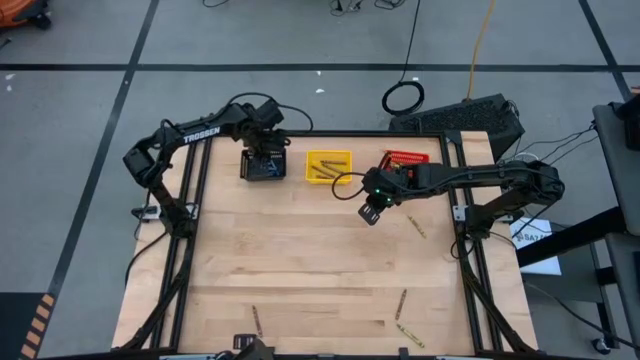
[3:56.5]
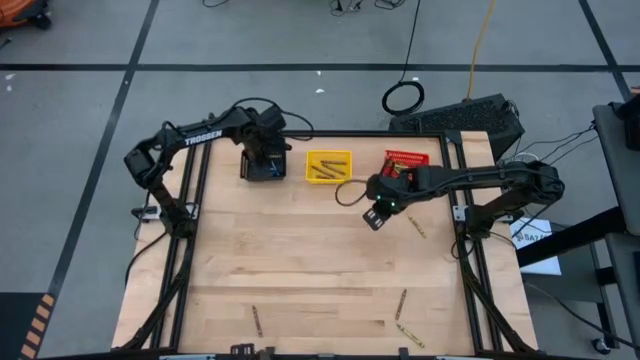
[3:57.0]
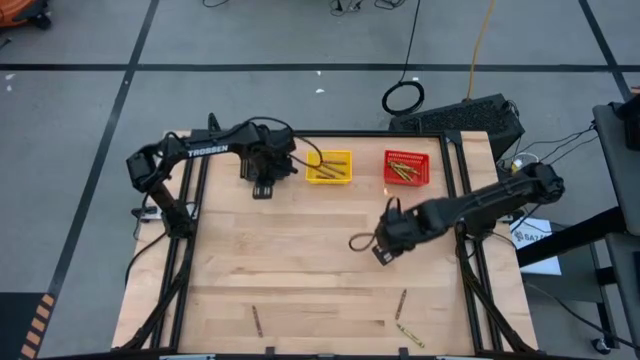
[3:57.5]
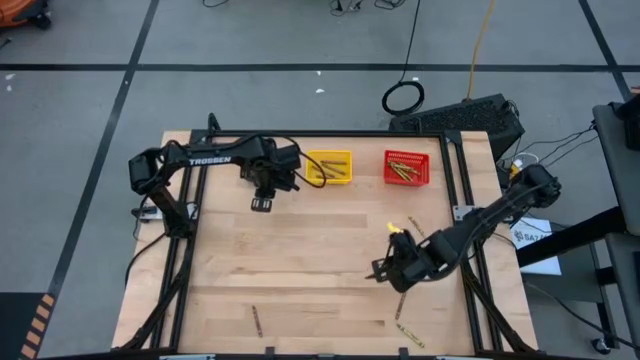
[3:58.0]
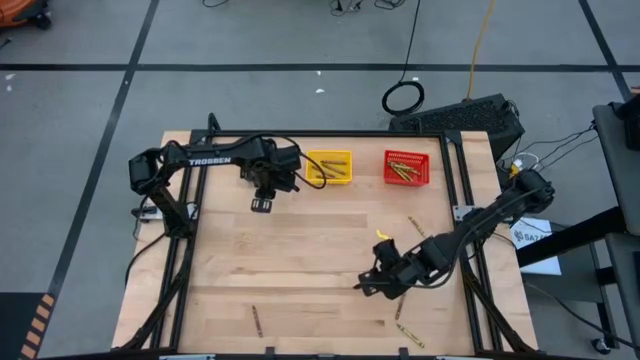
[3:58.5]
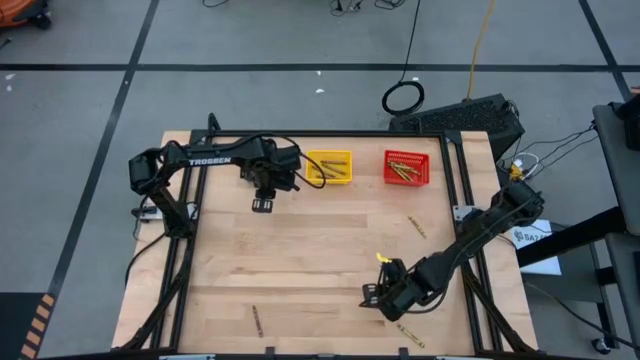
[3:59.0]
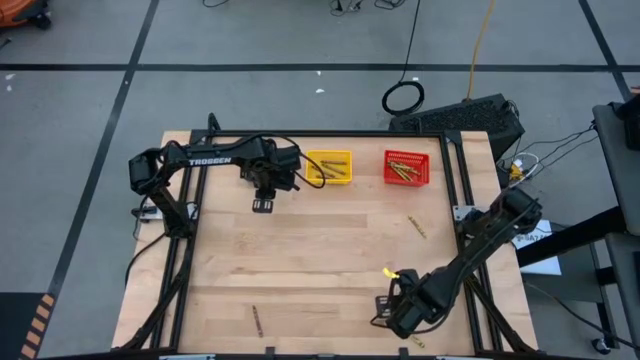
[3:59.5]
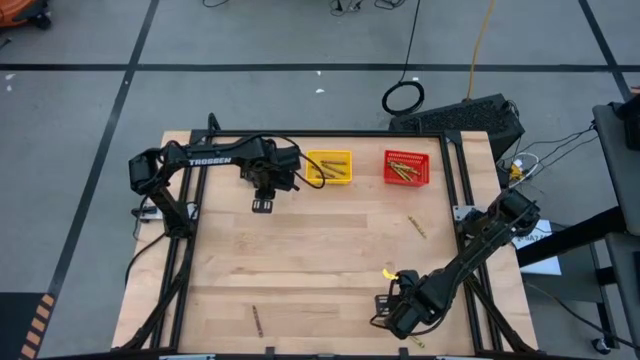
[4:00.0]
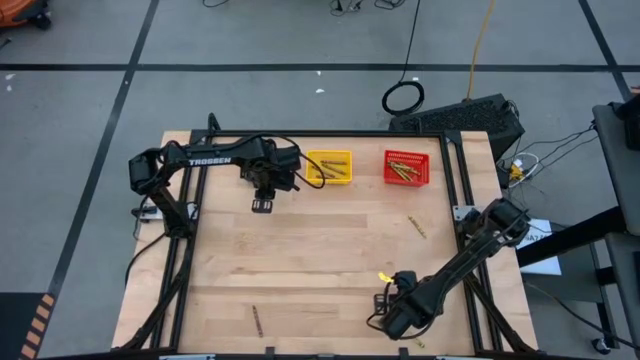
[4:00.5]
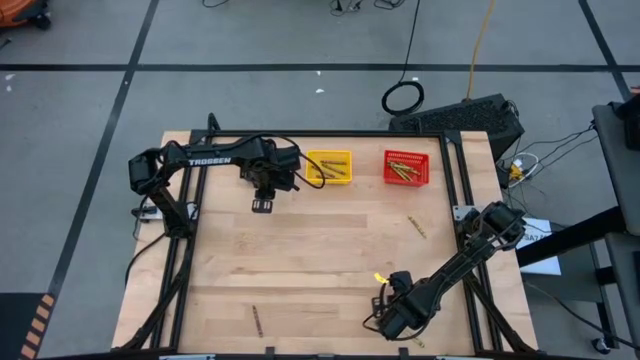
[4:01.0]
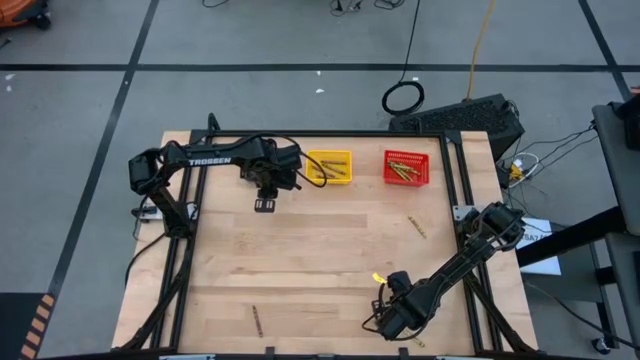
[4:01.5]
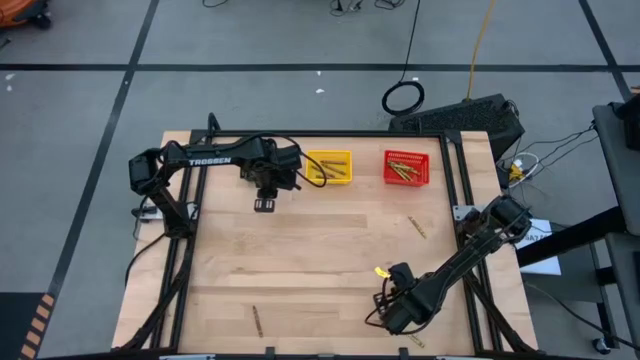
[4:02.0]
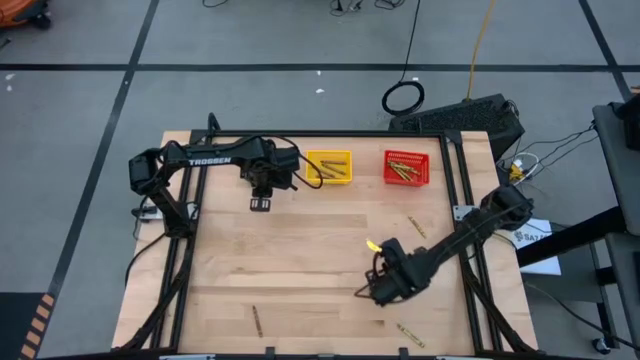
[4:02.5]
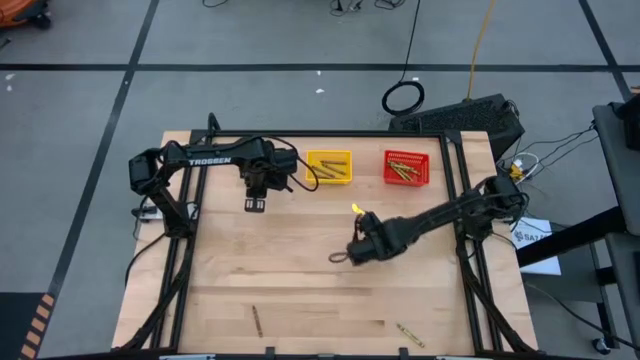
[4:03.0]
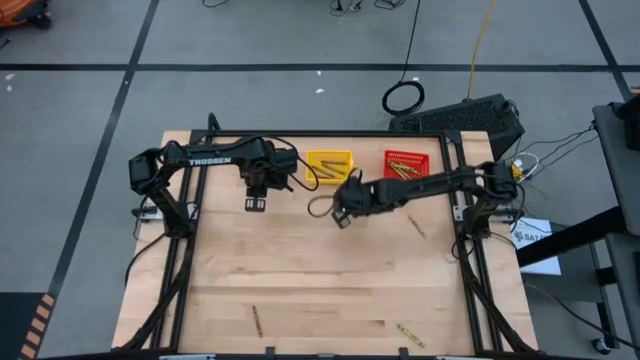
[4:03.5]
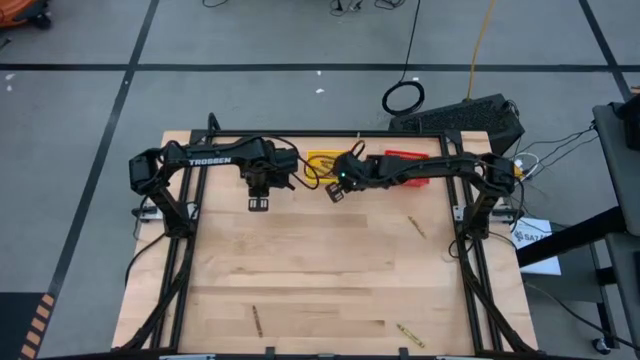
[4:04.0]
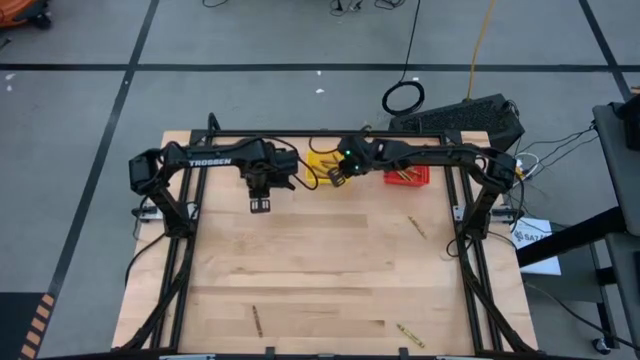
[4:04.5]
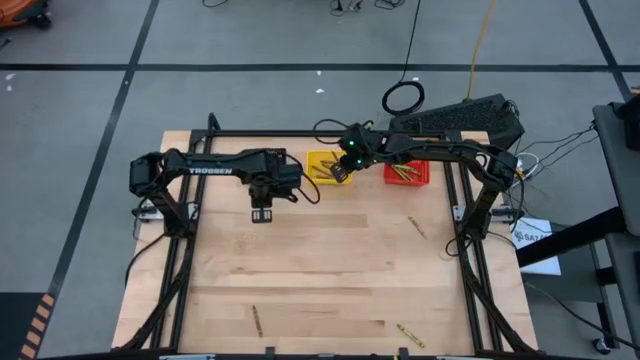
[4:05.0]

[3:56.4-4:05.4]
Task: Sort crayons
Put the brown crayon into the yellow bin

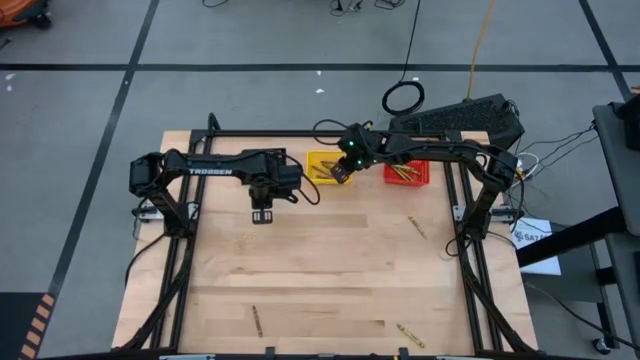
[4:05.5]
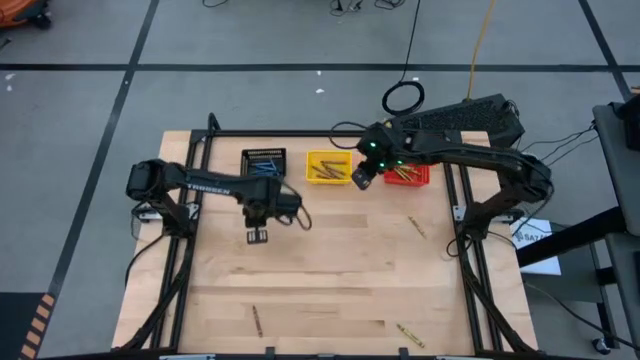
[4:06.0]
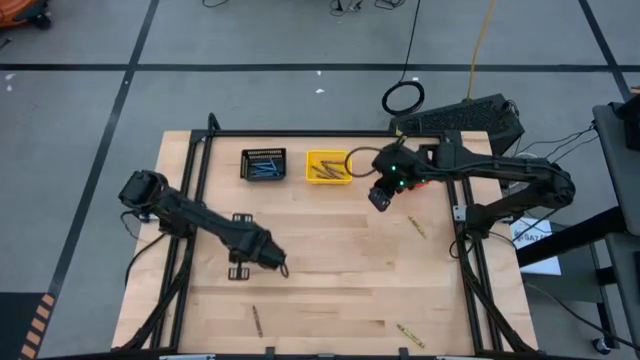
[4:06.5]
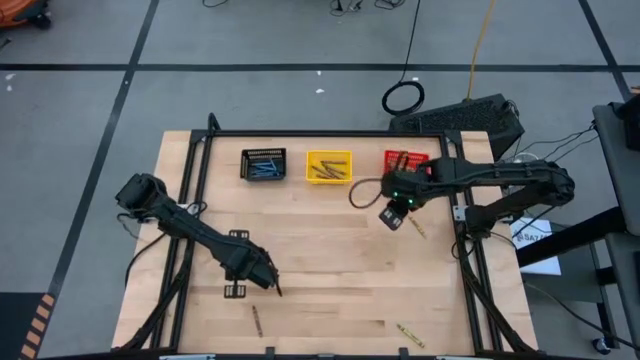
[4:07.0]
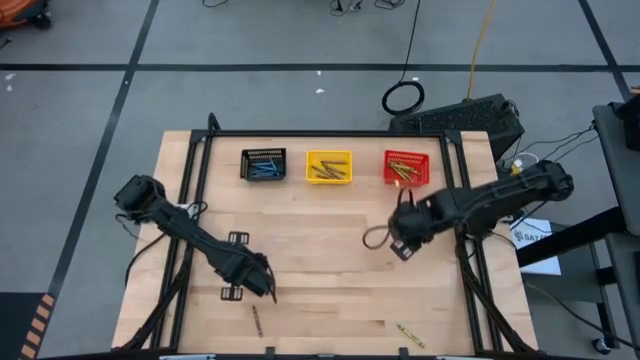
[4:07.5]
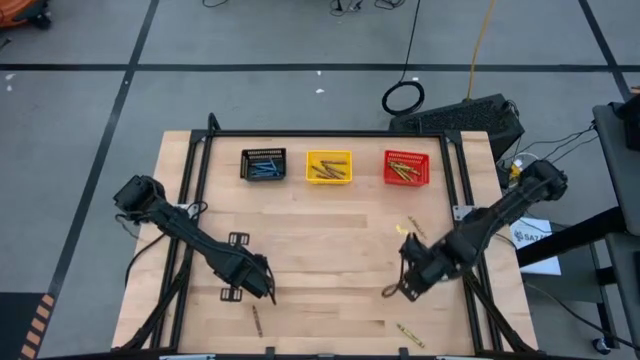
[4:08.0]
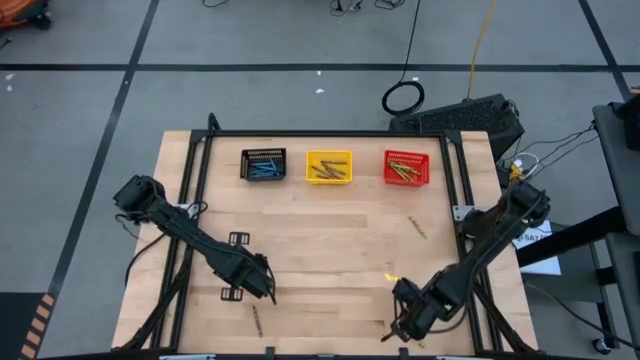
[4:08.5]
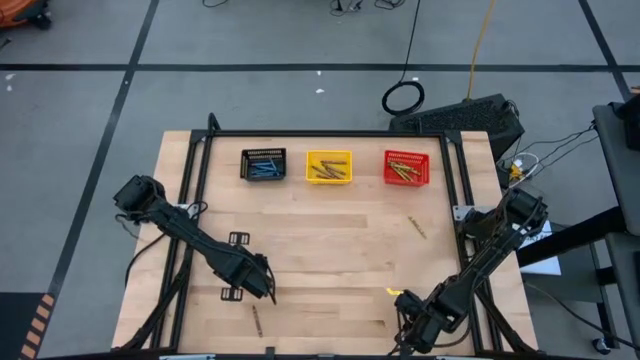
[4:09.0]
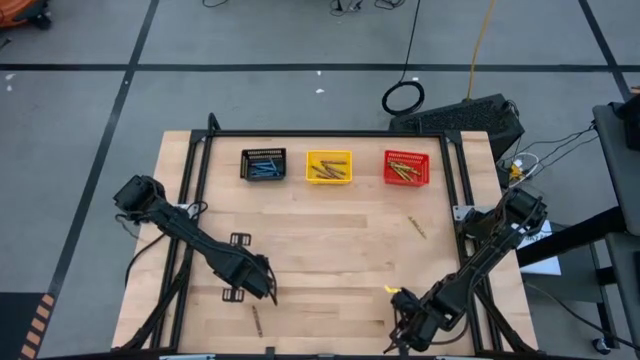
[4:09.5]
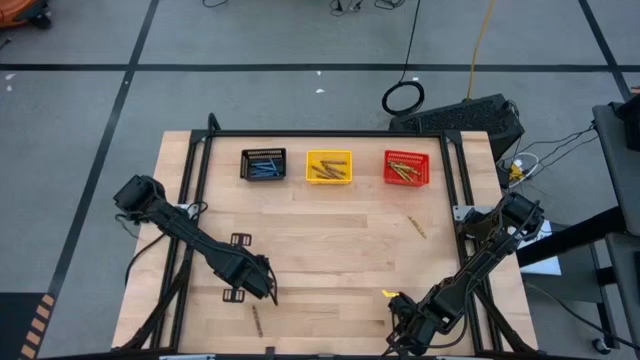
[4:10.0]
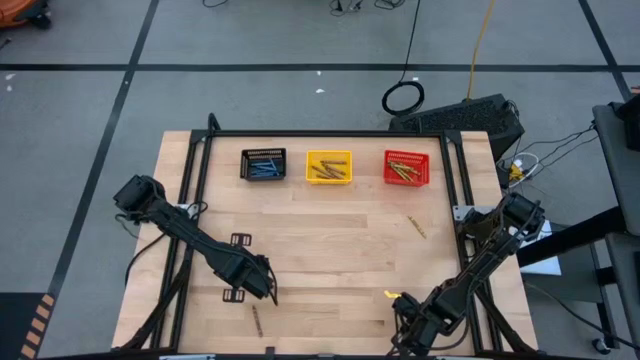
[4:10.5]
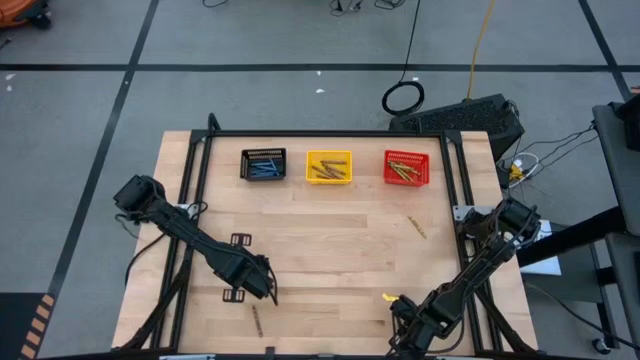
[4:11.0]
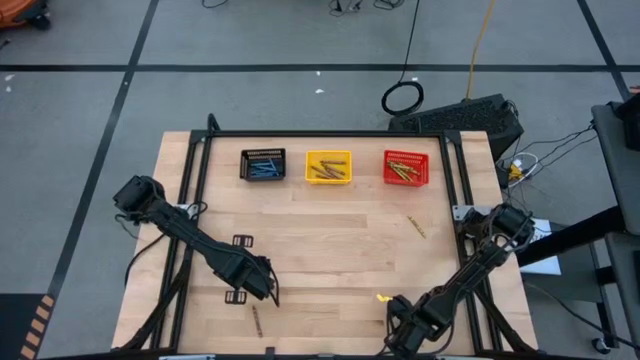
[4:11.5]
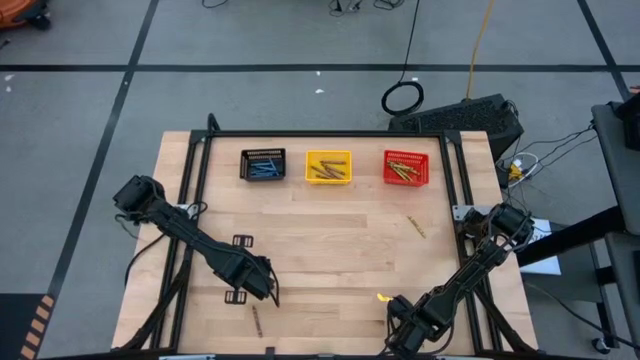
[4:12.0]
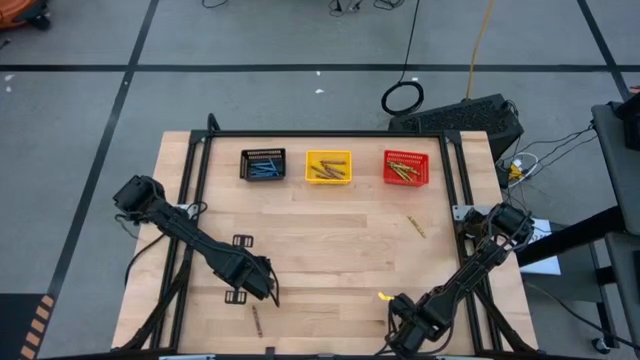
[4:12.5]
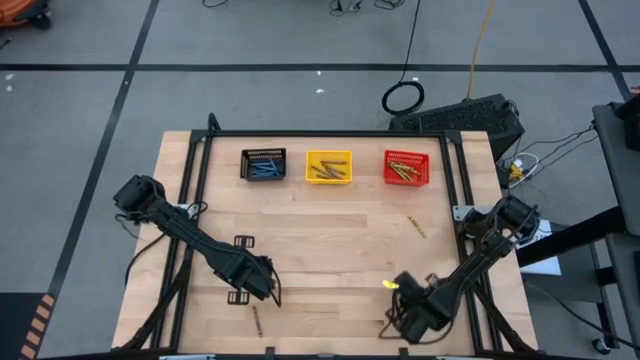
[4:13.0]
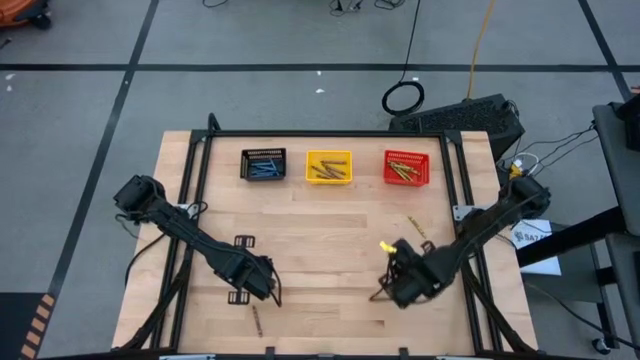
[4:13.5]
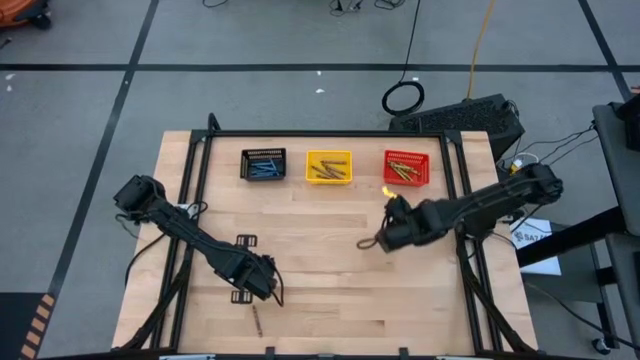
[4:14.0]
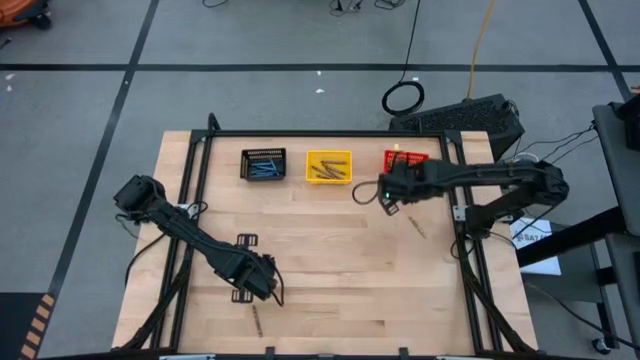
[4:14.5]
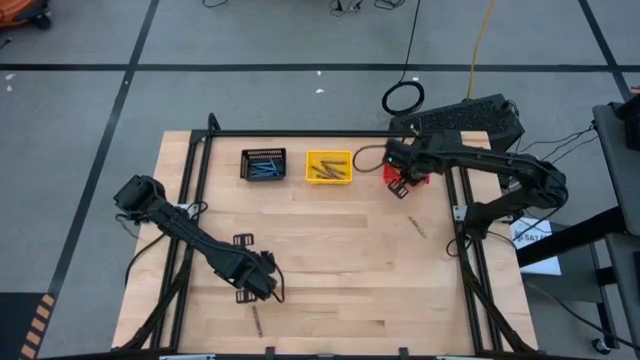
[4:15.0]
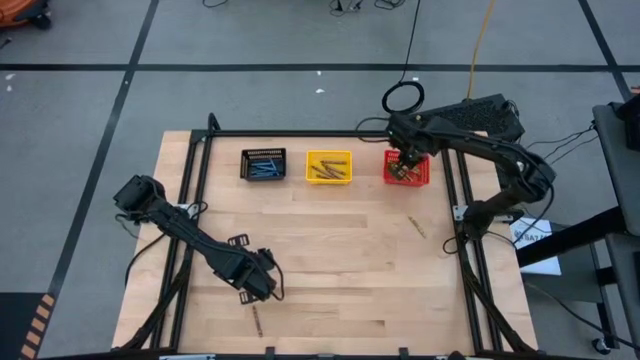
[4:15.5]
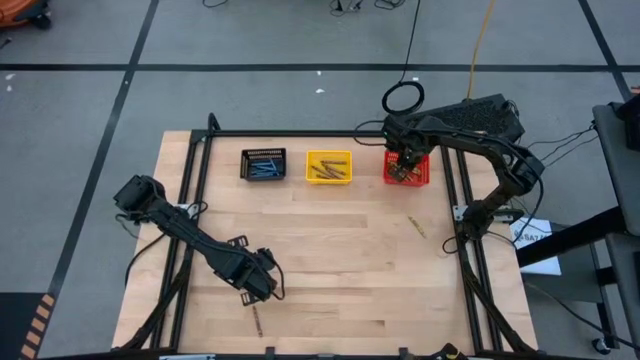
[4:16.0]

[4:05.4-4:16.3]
Put the green crayon into the red bin

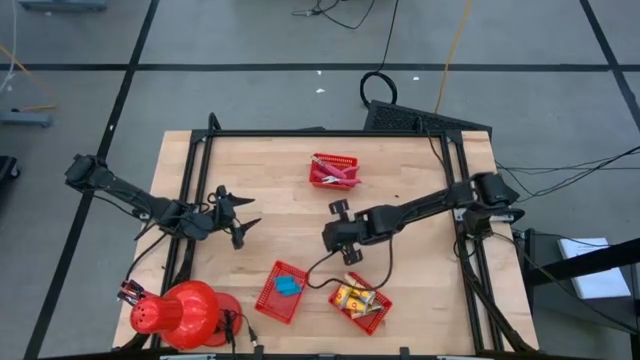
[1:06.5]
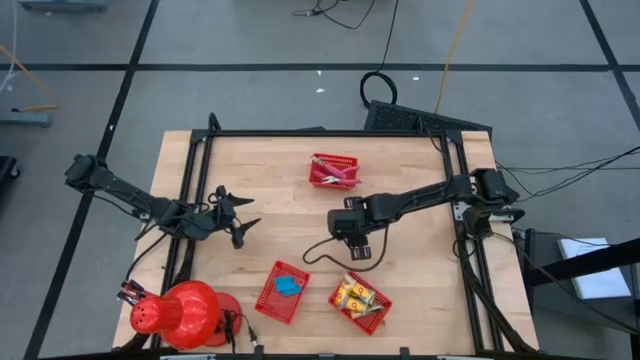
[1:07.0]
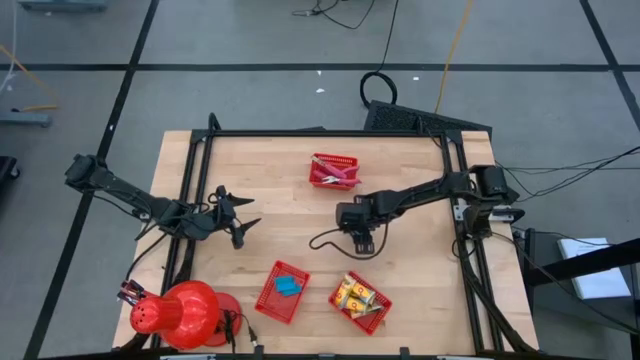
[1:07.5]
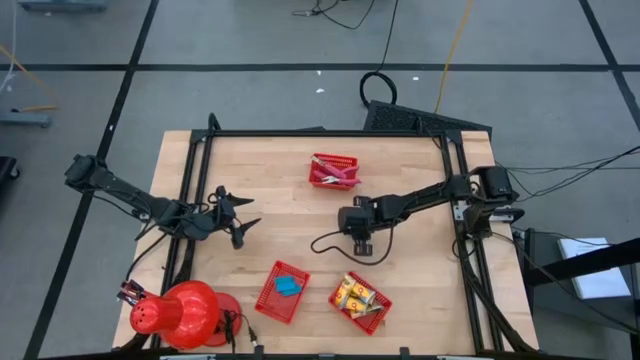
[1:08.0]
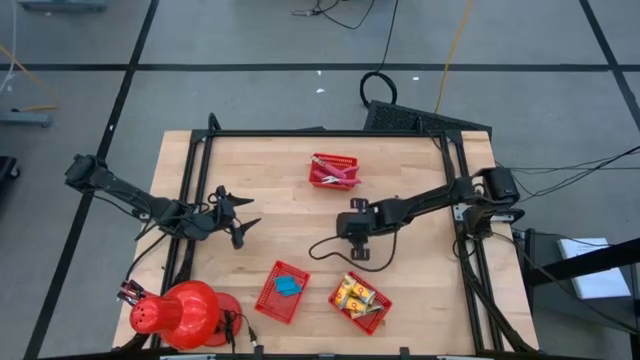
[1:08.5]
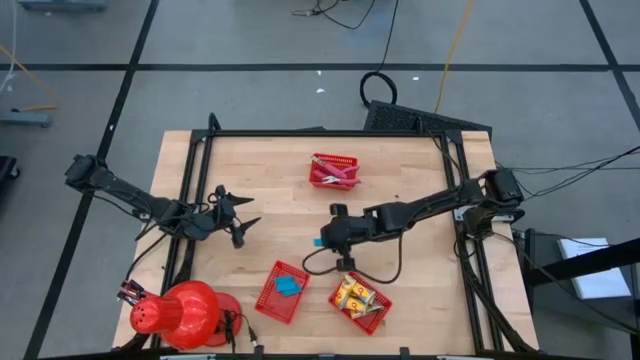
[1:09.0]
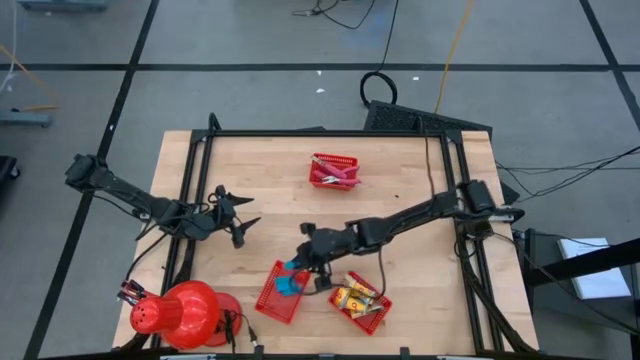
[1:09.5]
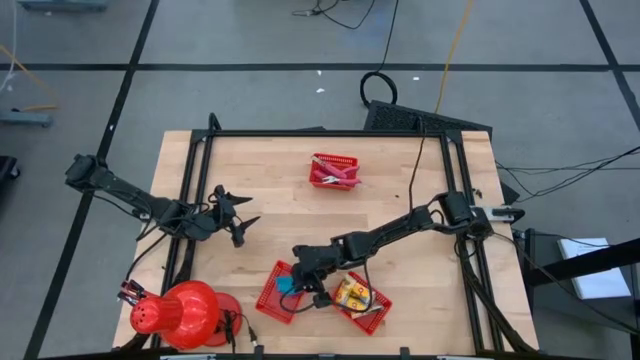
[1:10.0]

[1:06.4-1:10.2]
Task: Pick & Place School Supplies
Put the blue eraser into the bottom left red basket
